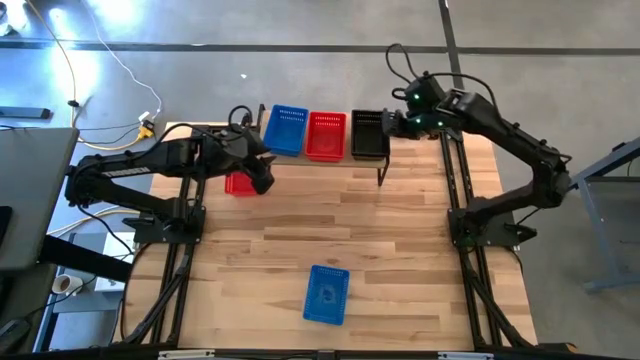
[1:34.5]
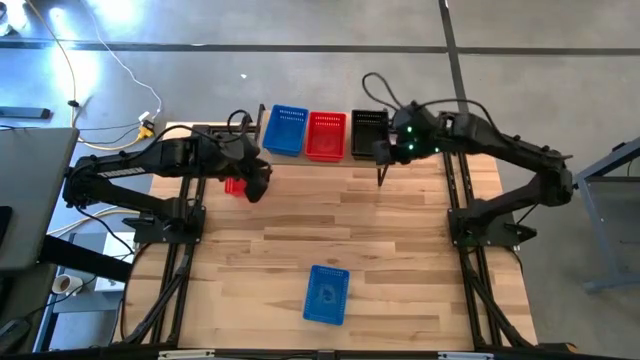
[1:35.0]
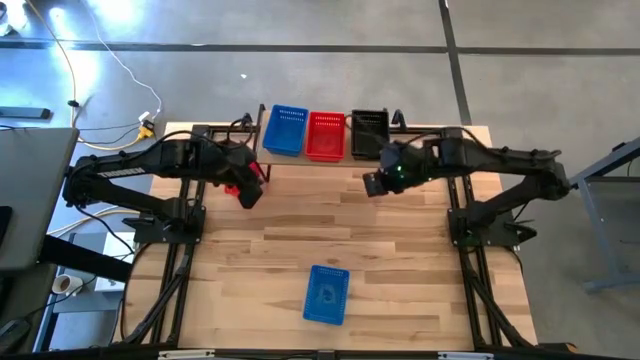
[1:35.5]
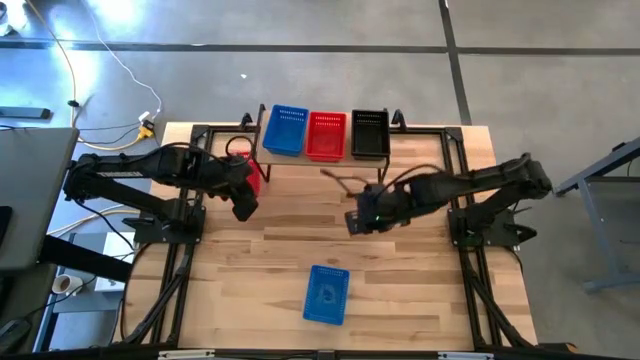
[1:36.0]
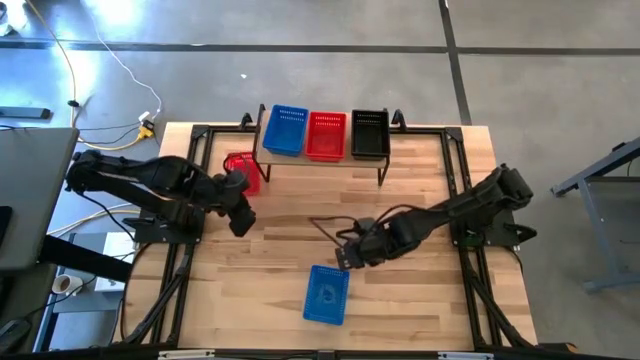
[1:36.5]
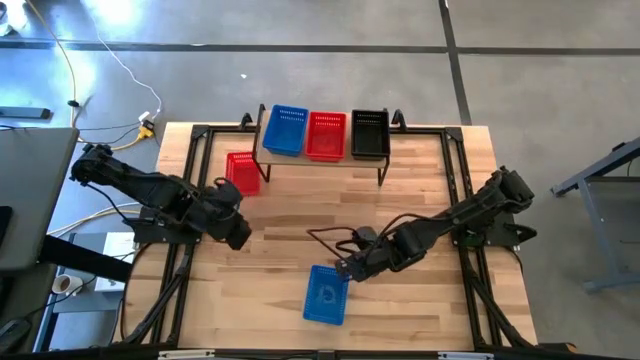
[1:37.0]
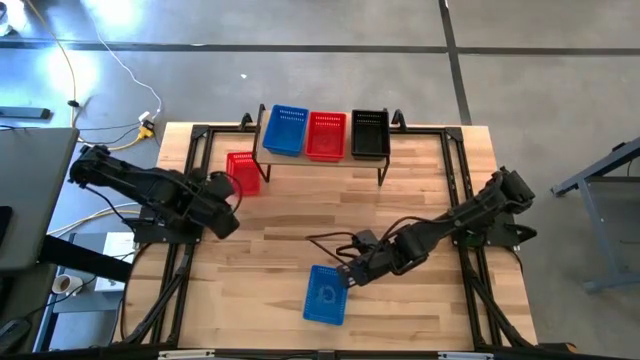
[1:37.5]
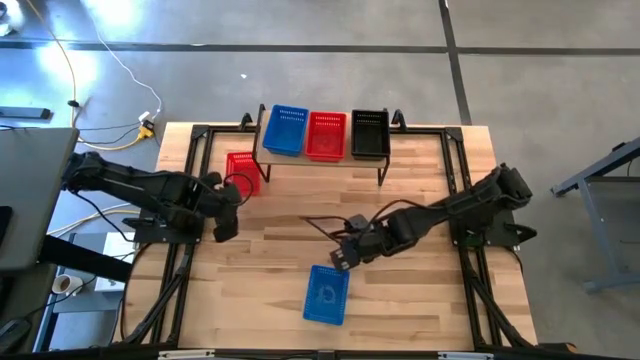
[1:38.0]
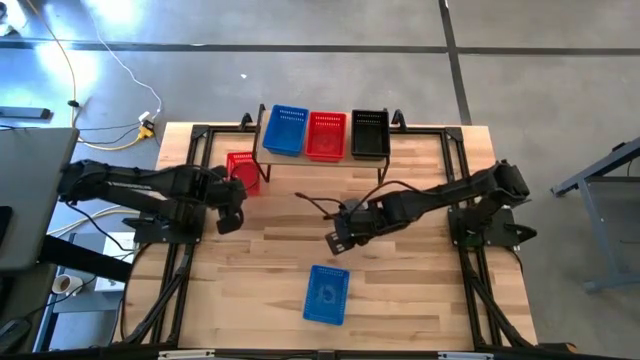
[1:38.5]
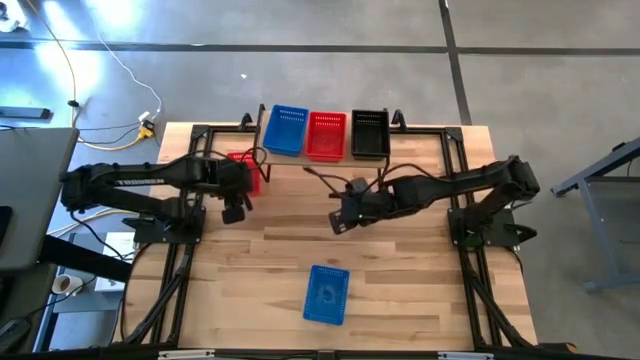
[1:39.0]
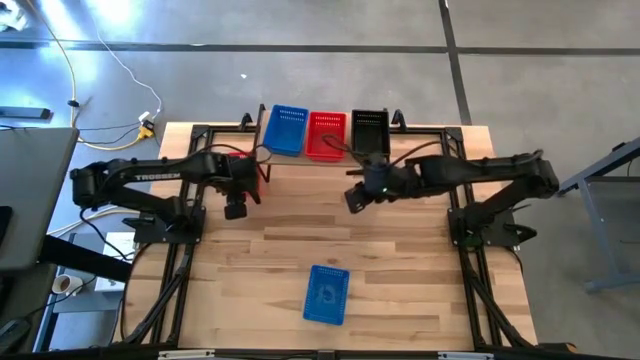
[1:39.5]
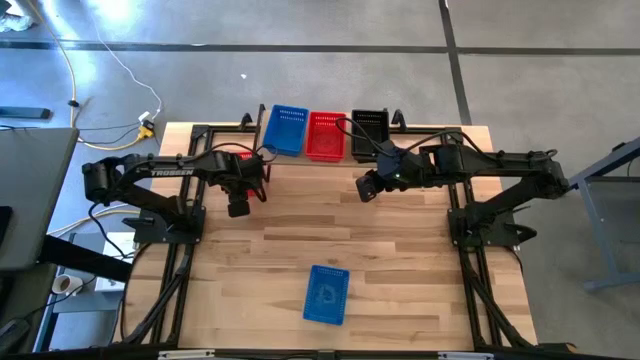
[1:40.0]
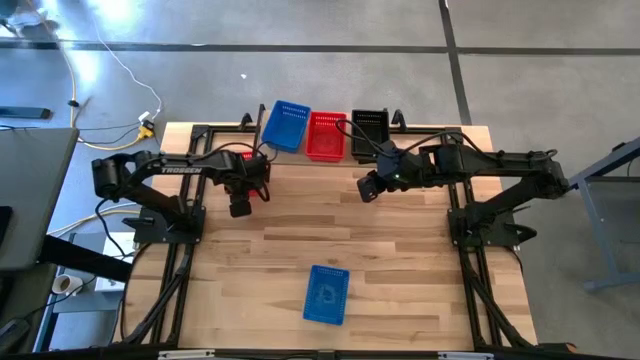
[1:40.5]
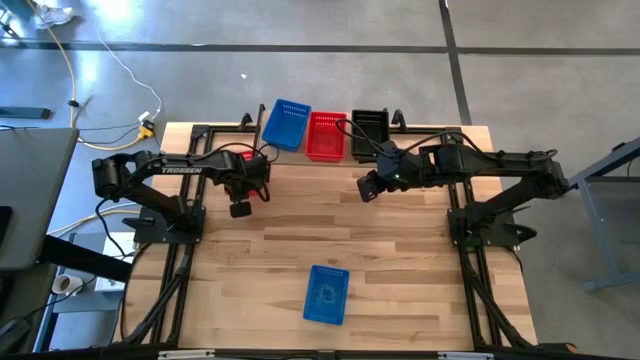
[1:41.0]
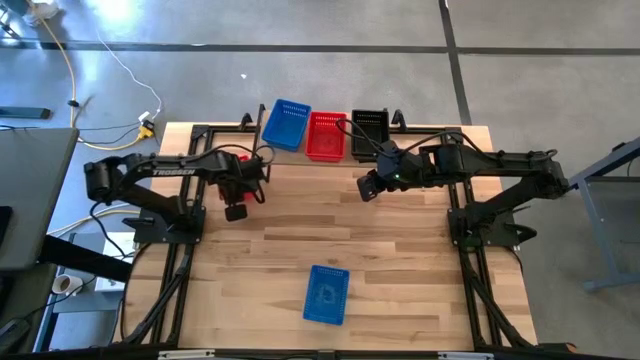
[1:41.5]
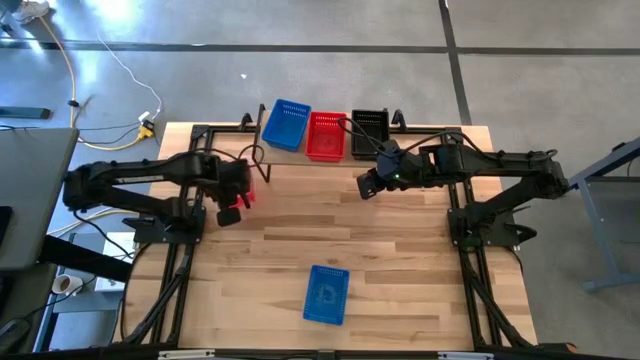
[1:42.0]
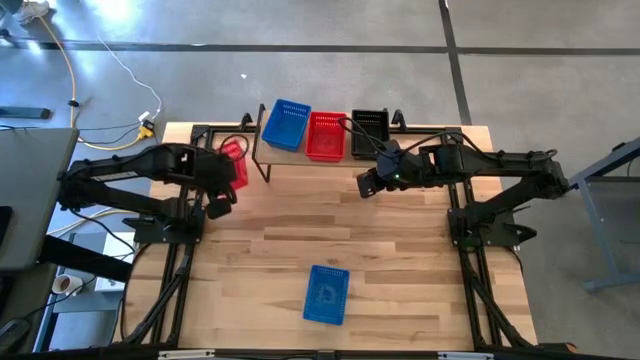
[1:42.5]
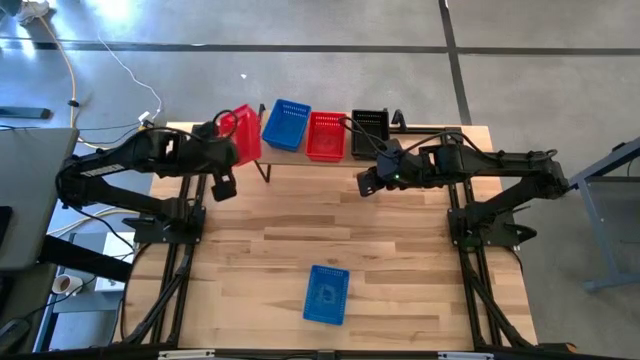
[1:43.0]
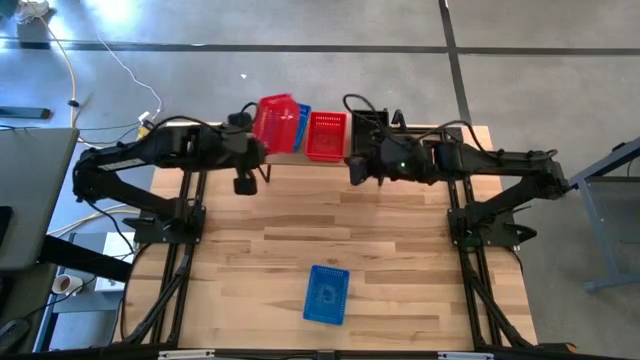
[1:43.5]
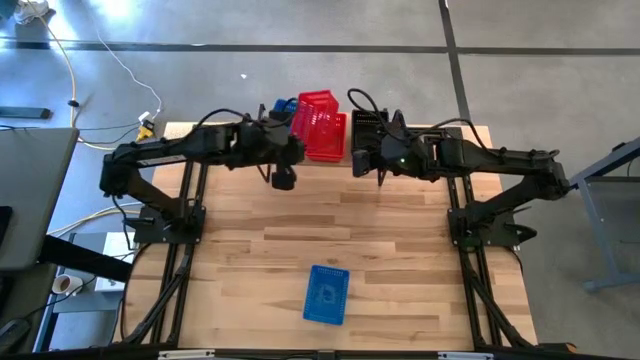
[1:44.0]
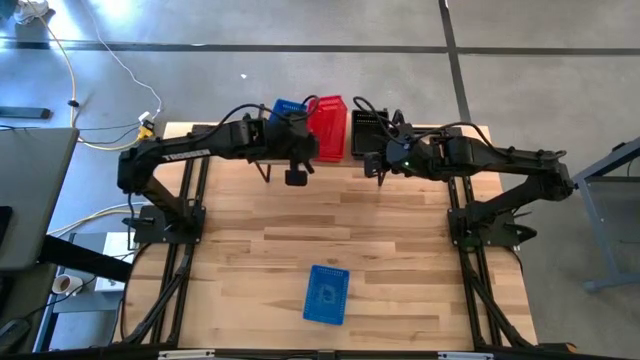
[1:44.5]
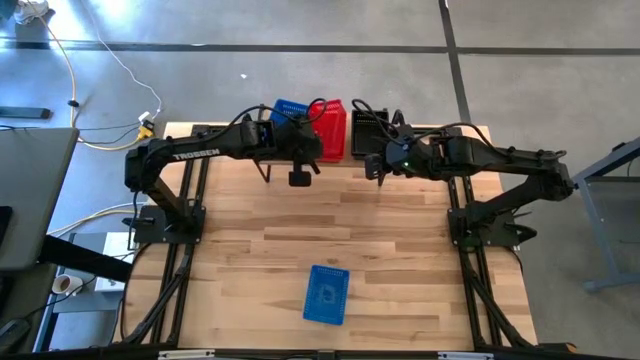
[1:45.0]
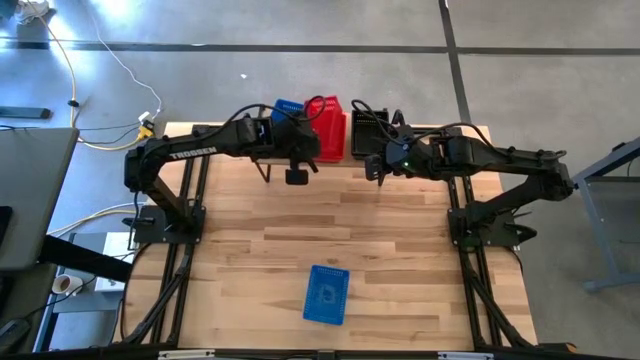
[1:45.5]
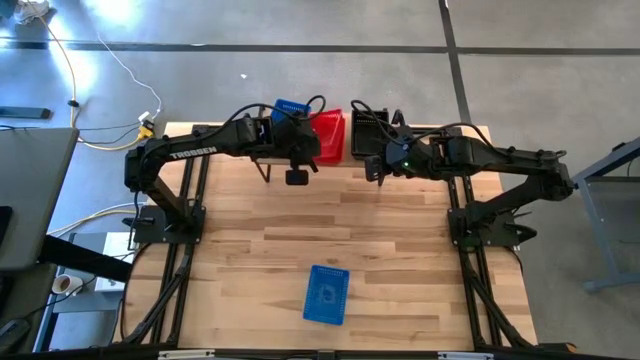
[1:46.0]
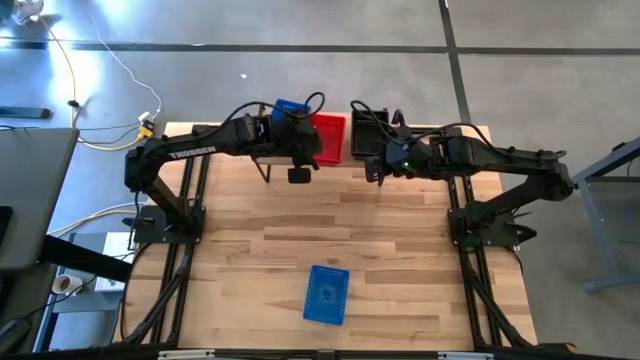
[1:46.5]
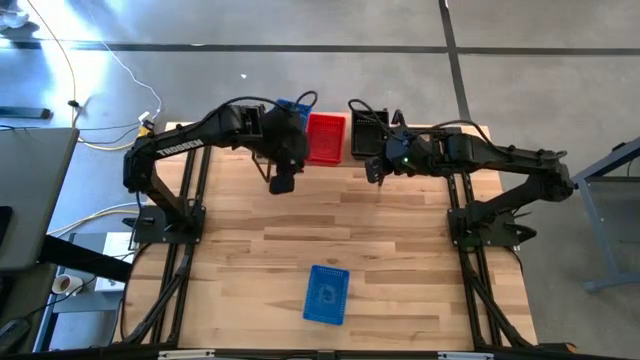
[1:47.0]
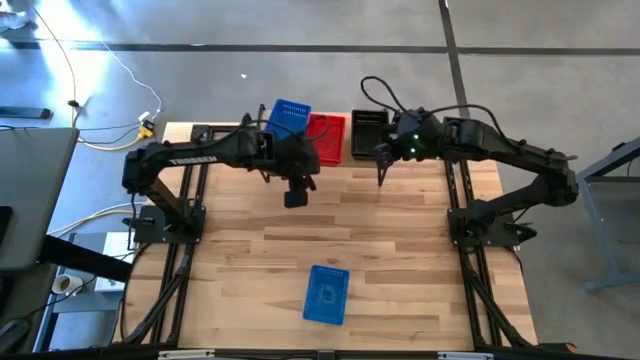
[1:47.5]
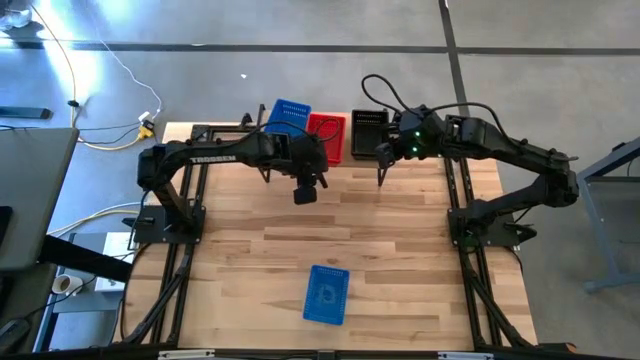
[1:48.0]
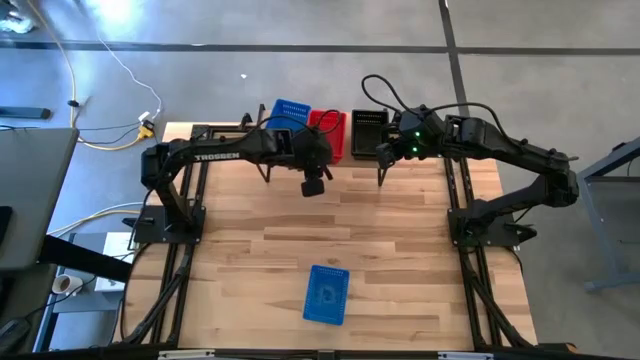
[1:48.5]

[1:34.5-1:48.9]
Task: Stack baskets on shelf by color
Stack the red basket into the red baskets on the shelf

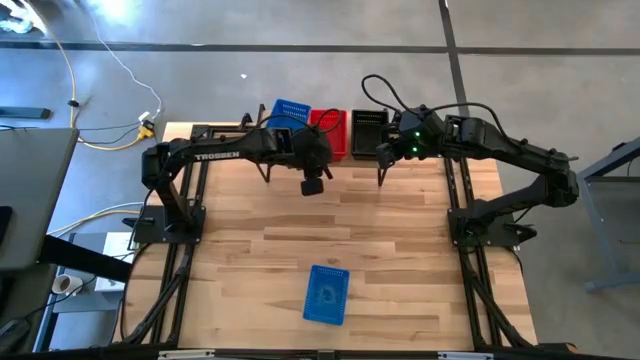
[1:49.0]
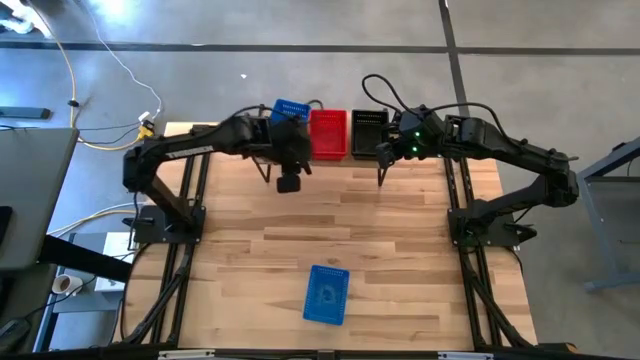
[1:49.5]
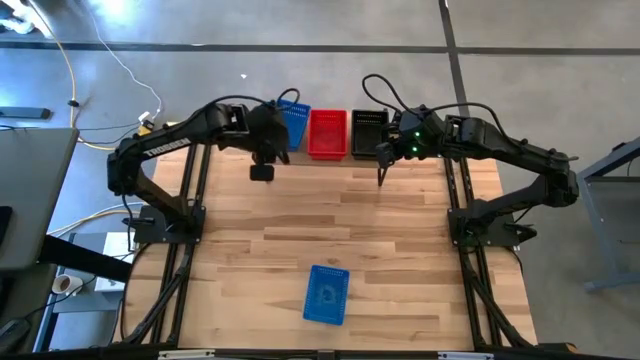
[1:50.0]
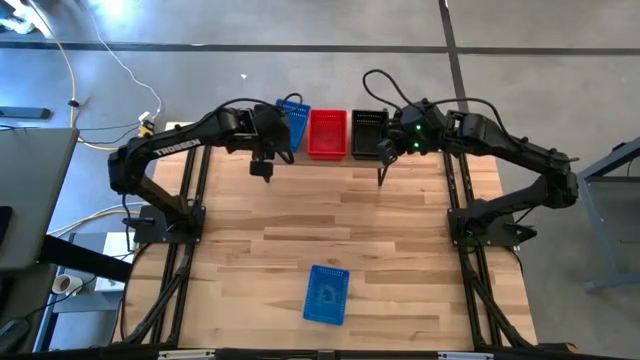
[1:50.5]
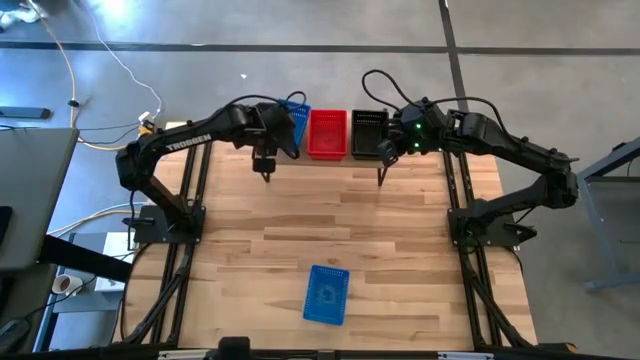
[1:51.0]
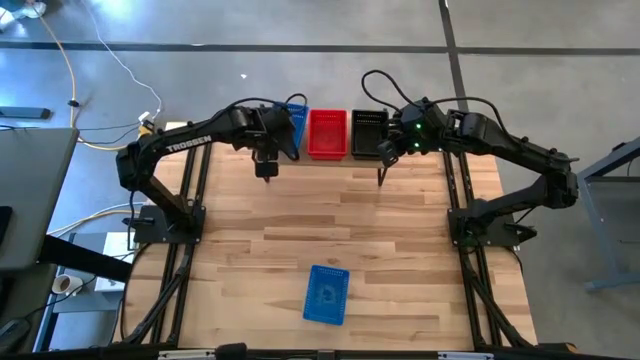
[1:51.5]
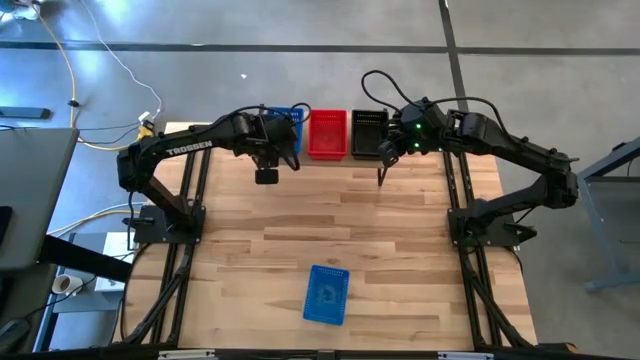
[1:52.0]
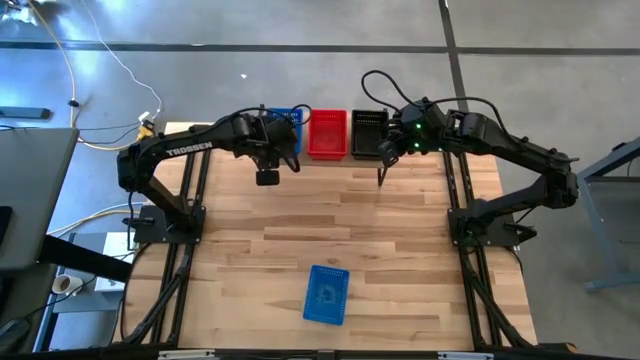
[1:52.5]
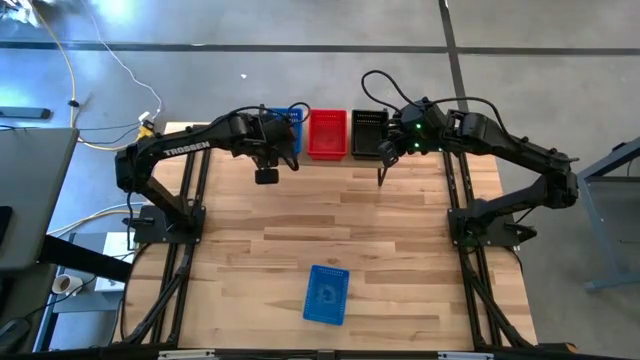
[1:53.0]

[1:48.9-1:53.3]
Adjust the blue baskets on the shelf

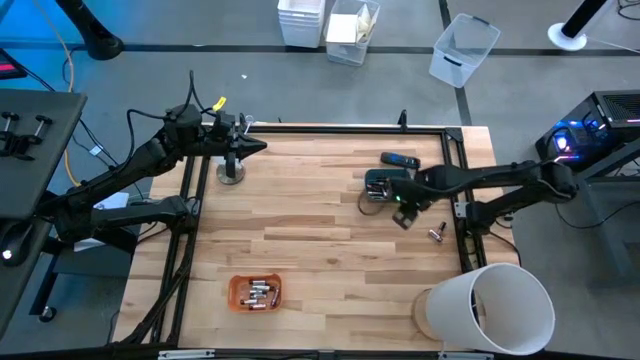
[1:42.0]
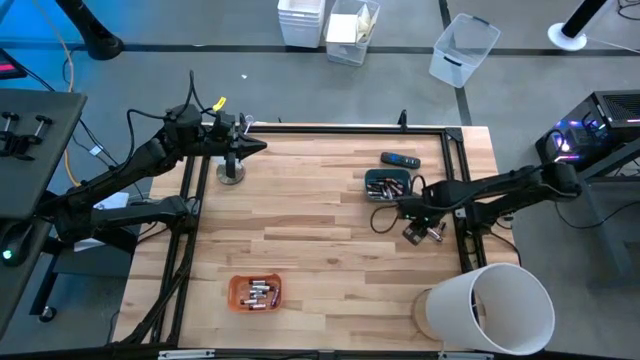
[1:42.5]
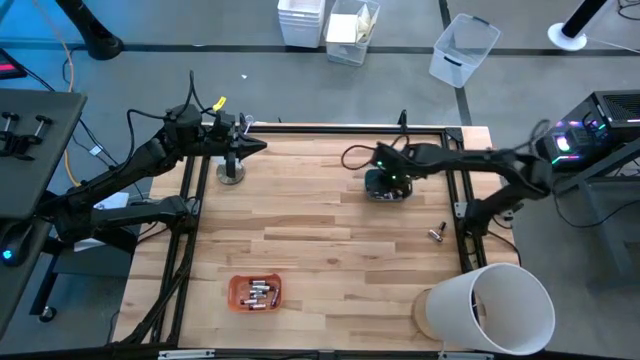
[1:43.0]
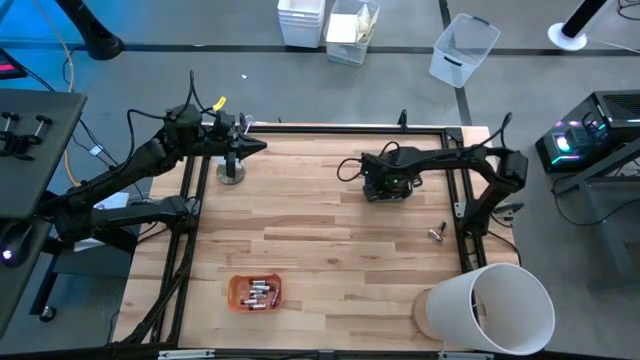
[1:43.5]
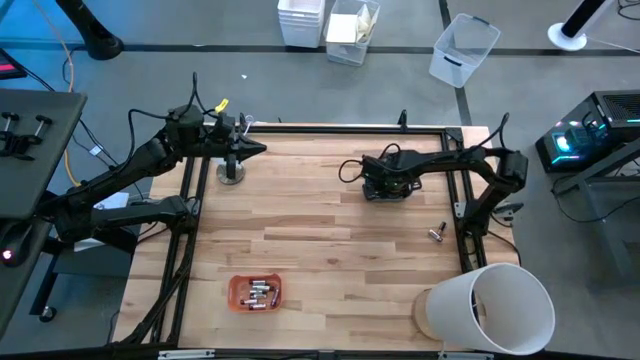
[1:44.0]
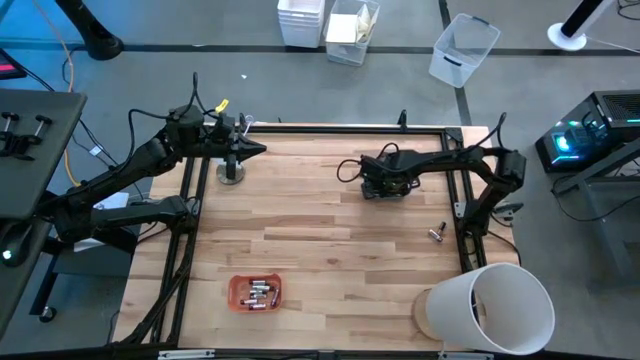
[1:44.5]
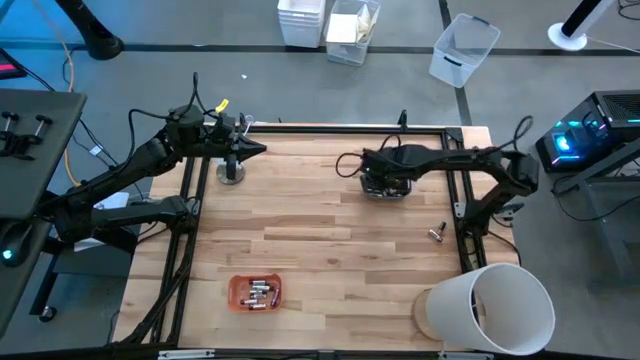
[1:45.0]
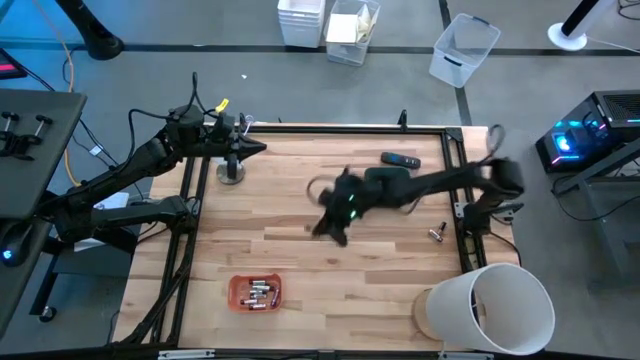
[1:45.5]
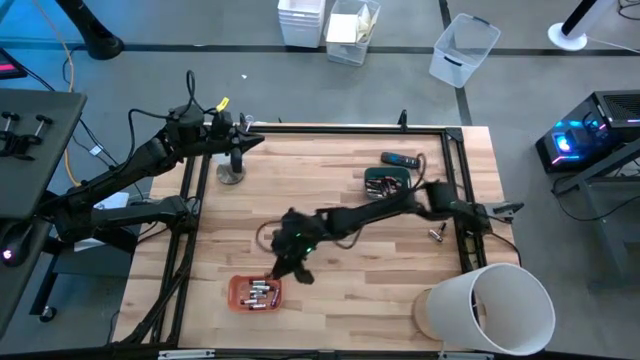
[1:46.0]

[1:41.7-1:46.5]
Task: Sort batteries
Put the silver battery into the orange bin
